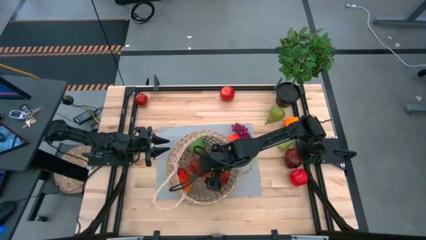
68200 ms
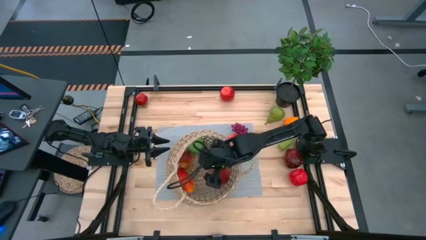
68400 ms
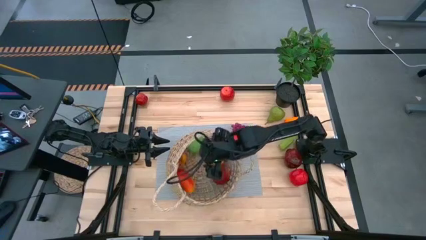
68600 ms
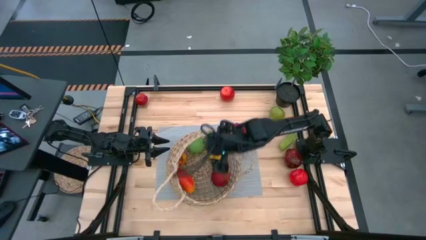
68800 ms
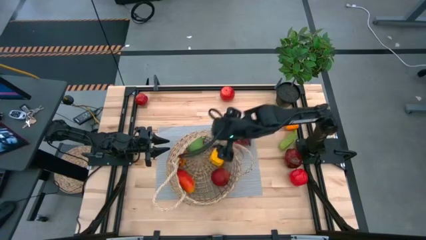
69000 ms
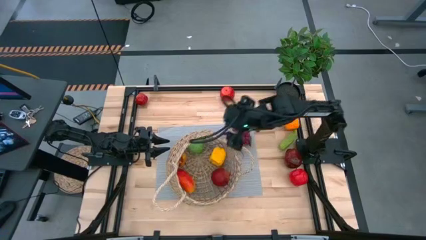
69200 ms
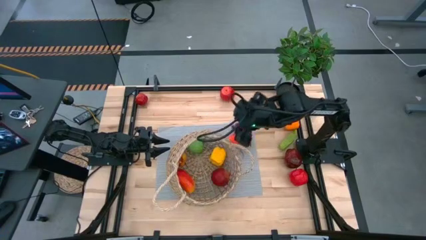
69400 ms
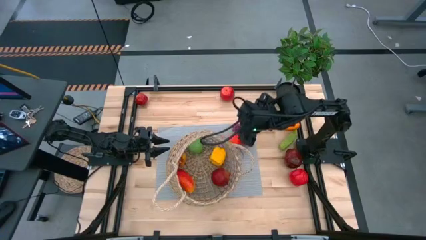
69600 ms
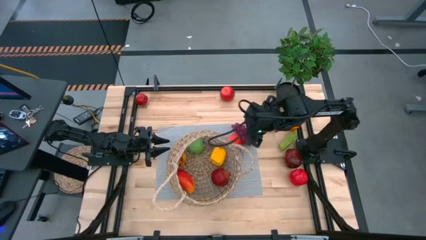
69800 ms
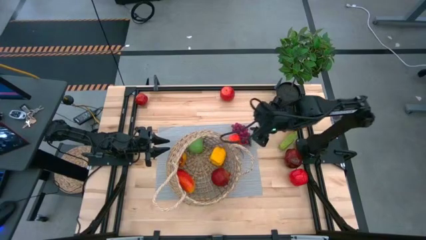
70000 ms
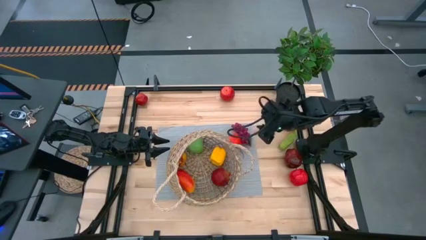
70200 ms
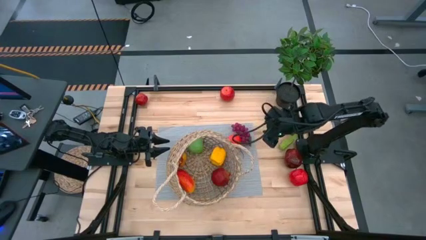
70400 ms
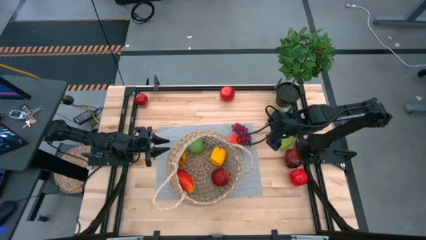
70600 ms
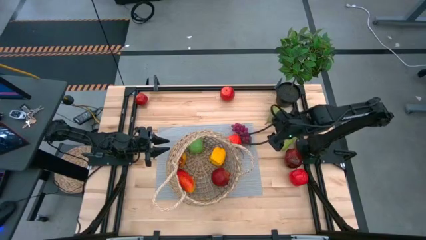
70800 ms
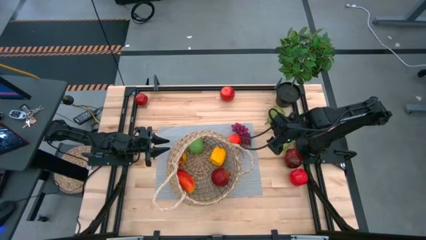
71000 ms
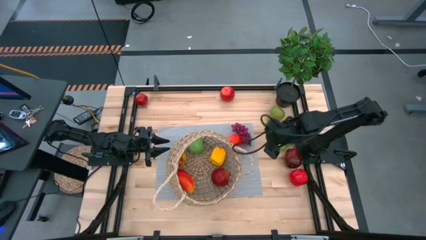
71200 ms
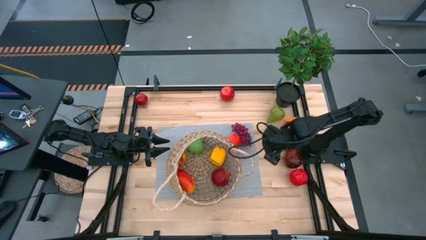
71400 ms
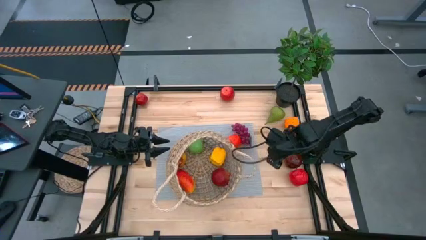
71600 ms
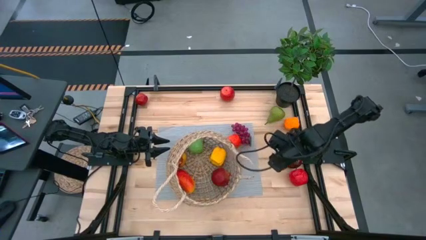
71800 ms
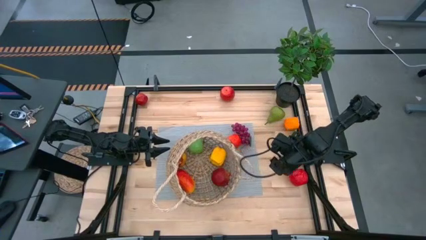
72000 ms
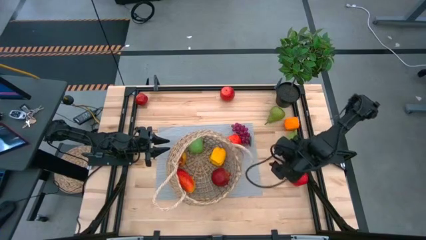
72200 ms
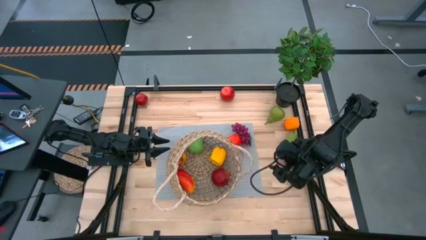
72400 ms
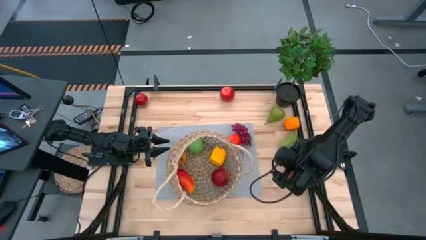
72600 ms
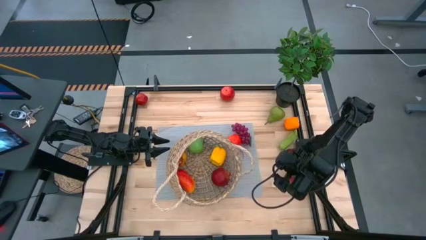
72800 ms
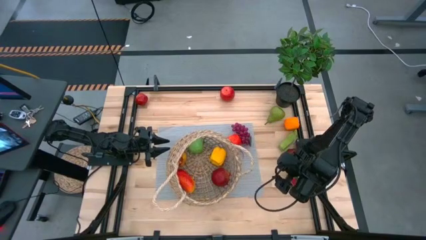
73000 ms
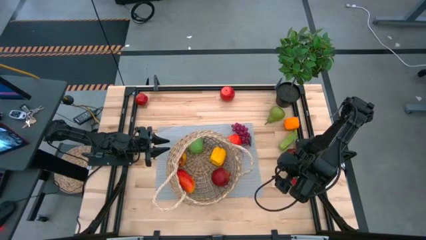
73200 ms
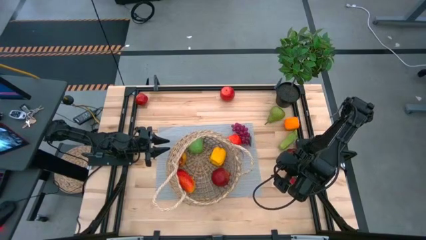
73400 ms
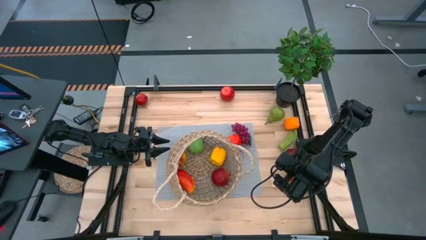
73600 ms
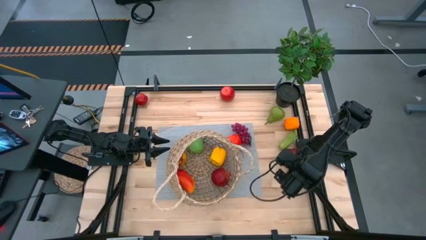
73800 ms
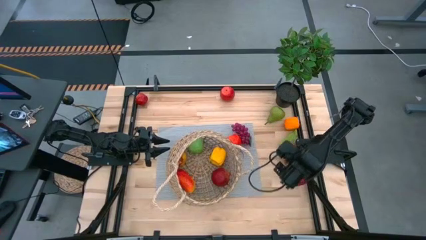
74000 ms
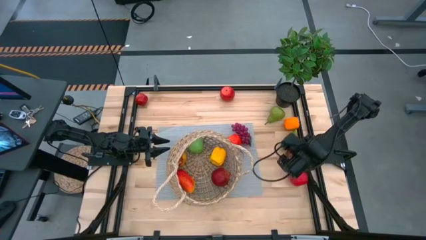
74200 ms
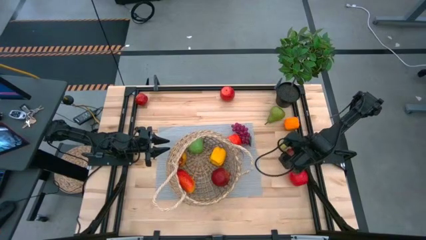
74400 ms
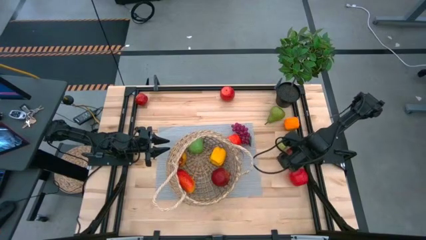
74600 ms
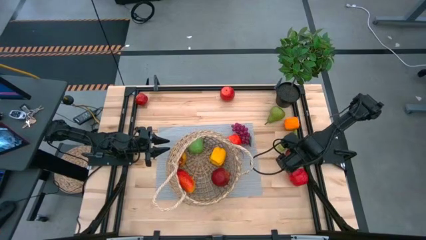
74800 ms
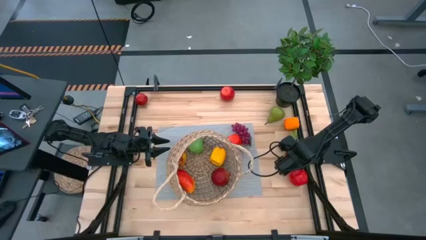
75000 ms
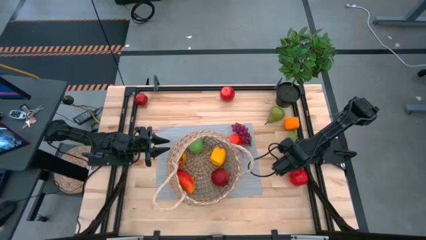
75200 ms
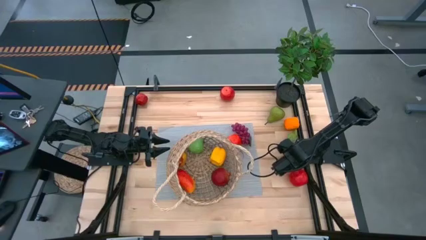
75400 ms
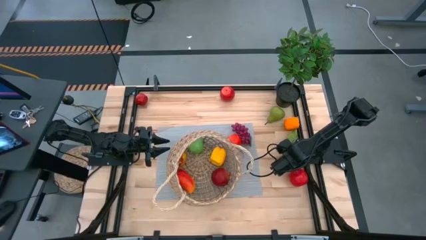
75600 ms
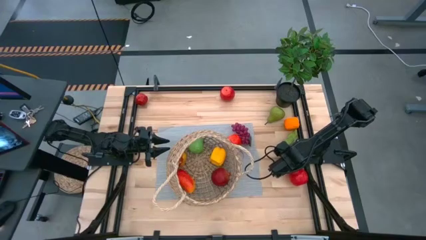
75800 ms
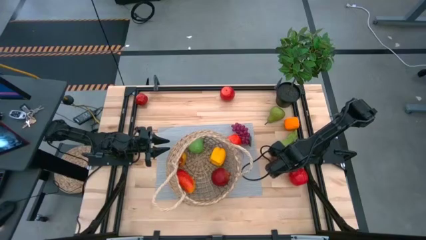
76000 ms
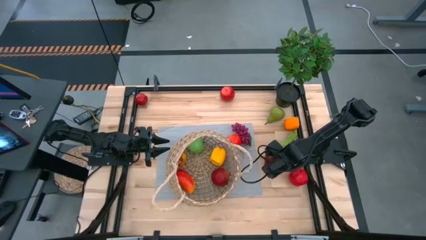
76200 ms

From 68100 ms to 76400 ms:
Task: Build produce basket
Put the red apple into the brown basket

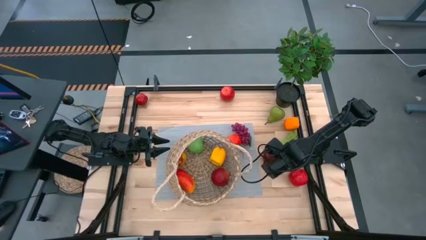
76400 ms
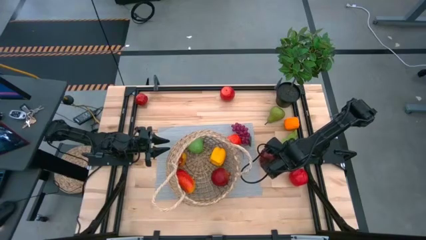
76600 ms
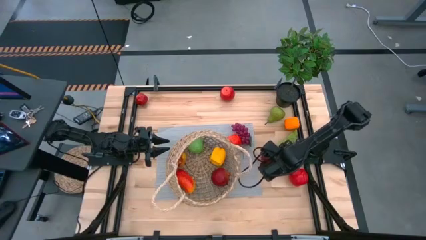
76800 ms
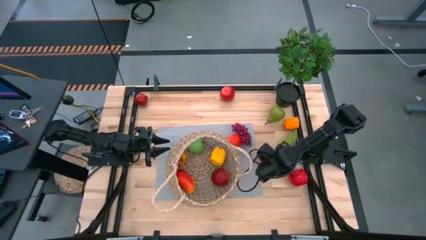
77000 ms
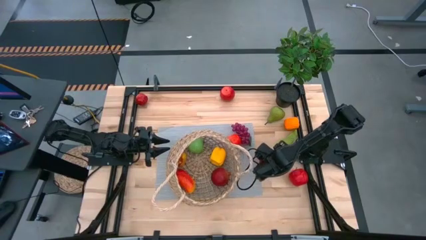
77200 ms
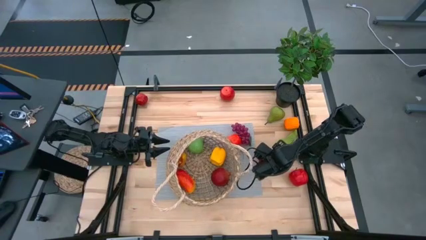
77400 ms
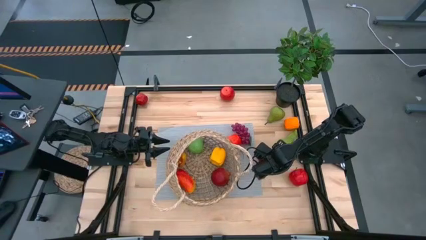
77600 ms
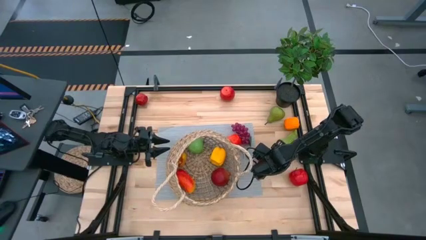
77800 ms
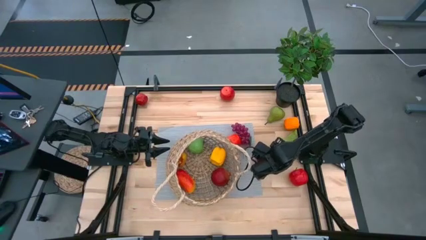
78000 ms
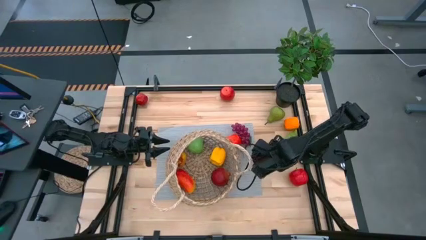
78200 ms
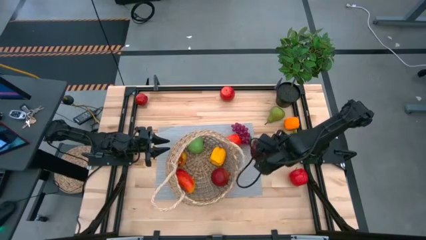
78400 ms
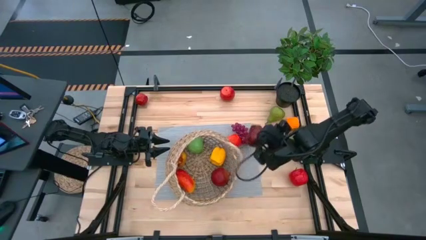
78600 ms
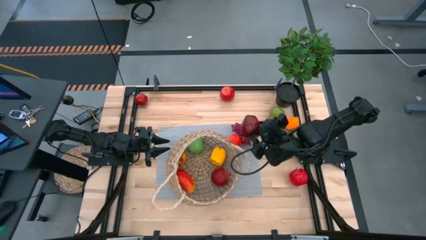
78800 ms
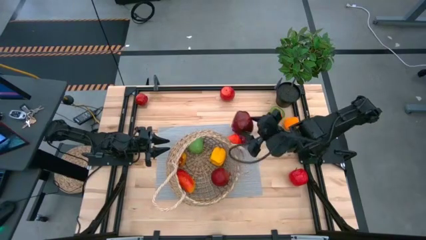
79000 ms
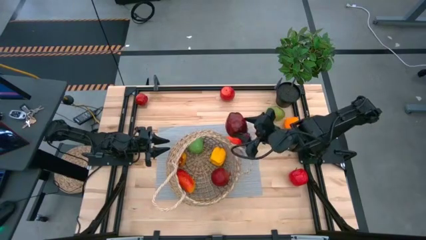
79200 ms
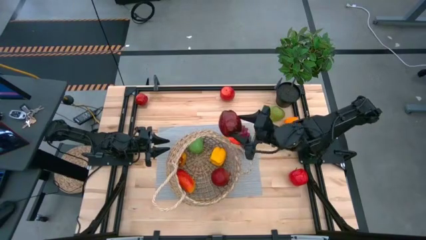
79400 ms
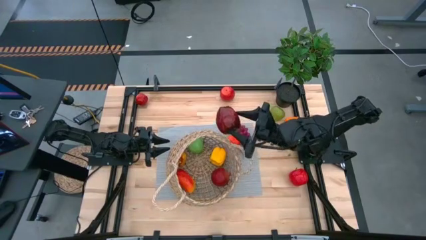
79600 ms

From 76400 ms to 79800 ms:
Put the red apple into the brown basket

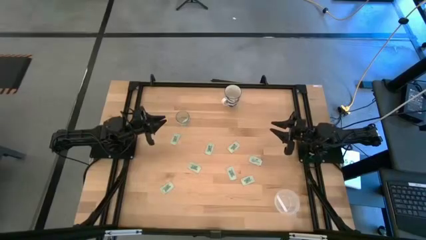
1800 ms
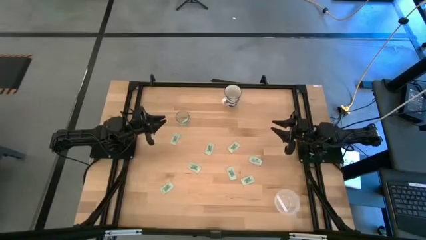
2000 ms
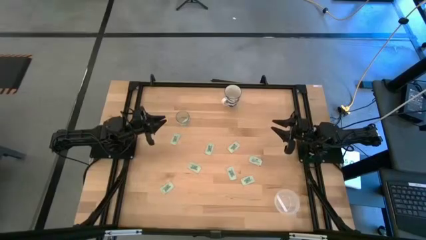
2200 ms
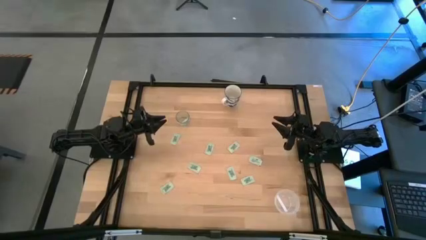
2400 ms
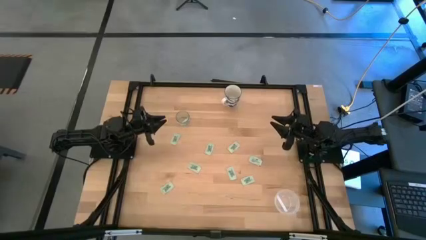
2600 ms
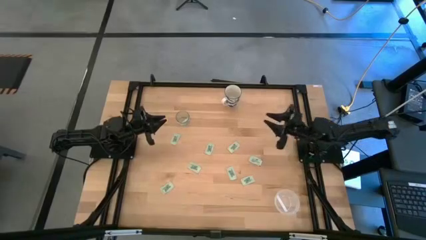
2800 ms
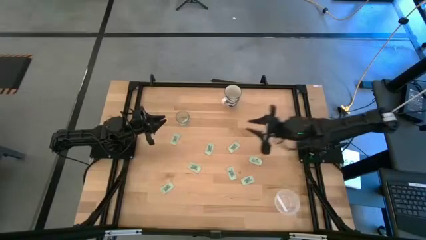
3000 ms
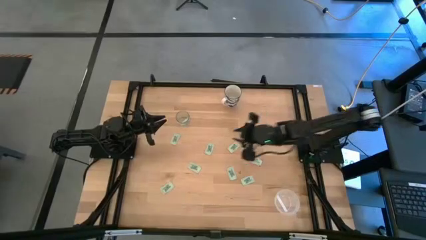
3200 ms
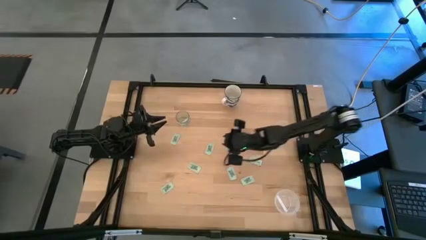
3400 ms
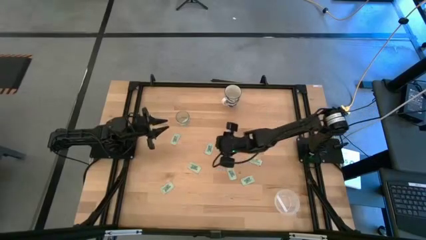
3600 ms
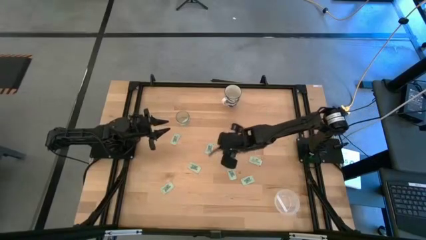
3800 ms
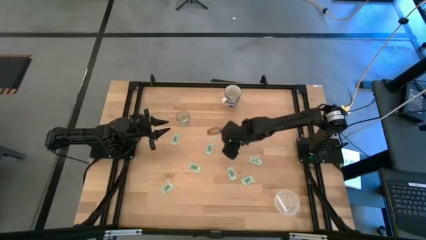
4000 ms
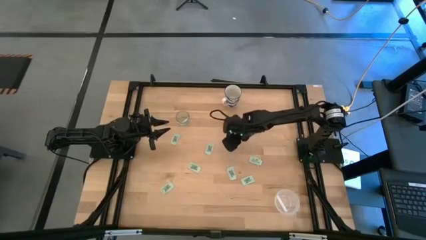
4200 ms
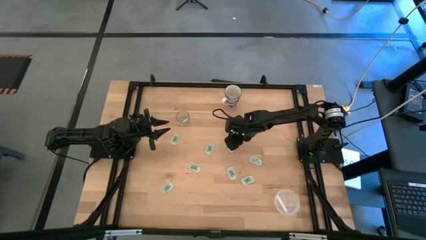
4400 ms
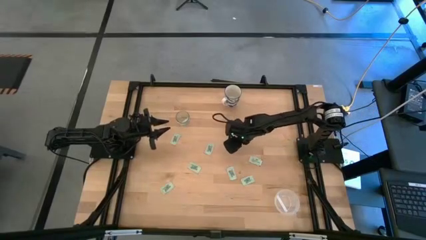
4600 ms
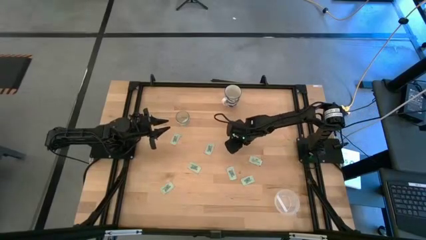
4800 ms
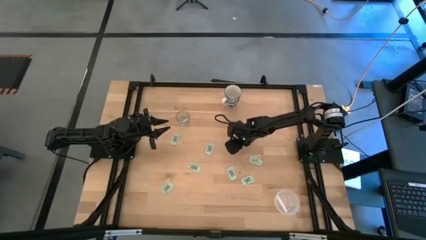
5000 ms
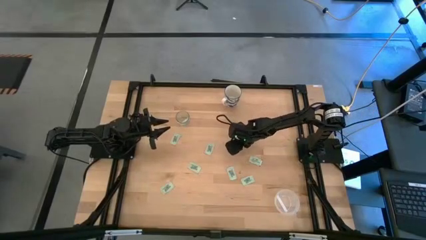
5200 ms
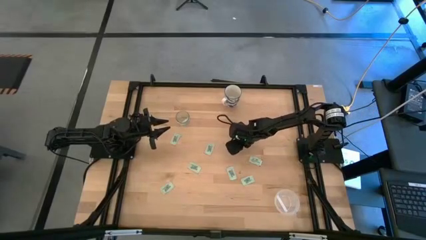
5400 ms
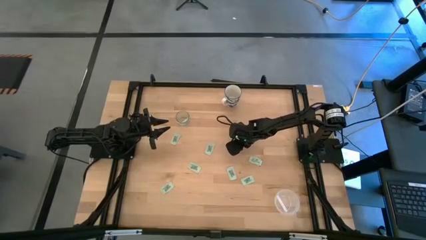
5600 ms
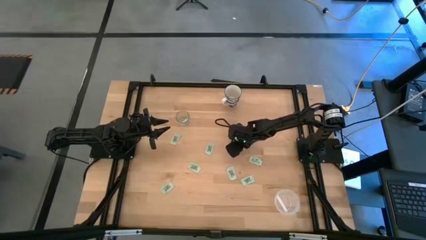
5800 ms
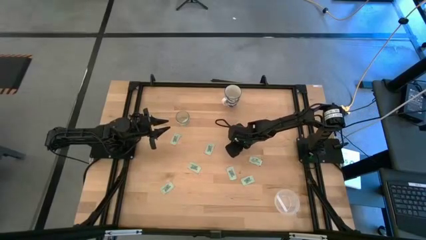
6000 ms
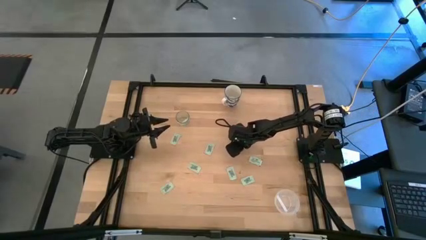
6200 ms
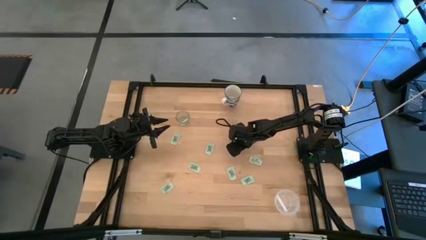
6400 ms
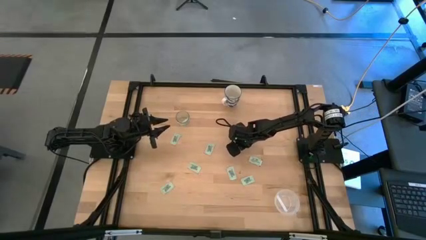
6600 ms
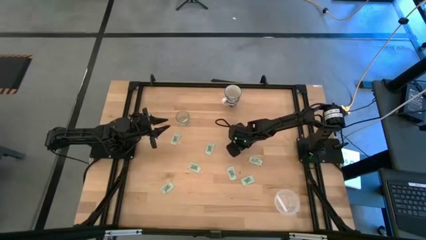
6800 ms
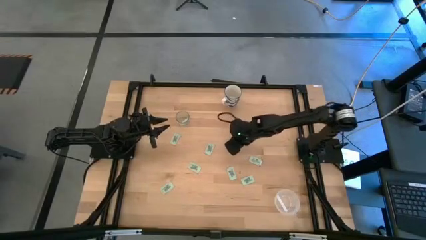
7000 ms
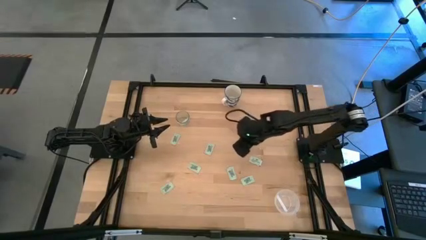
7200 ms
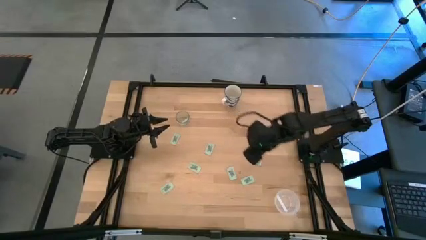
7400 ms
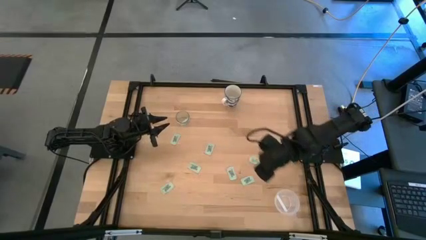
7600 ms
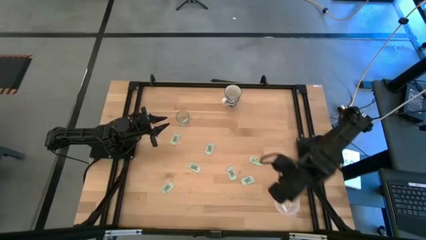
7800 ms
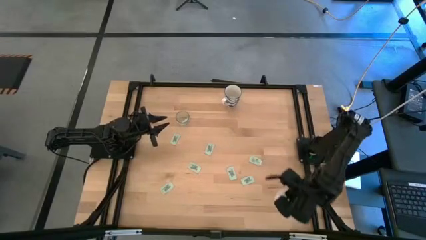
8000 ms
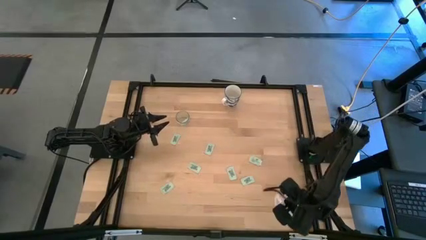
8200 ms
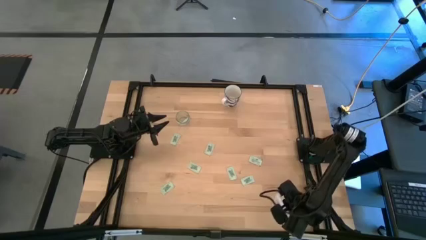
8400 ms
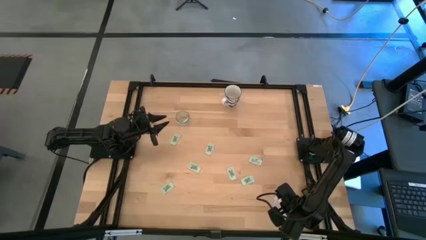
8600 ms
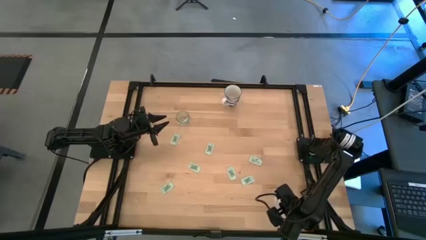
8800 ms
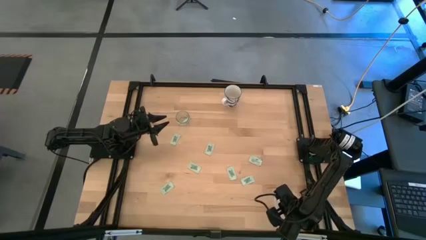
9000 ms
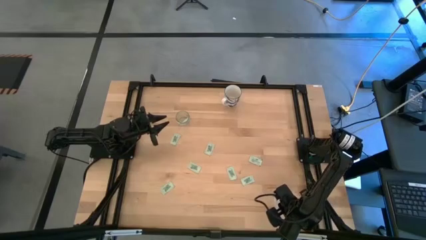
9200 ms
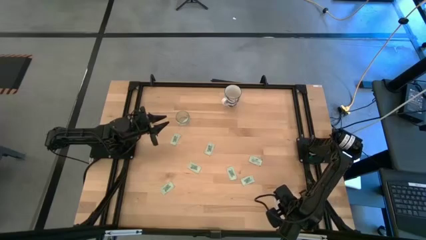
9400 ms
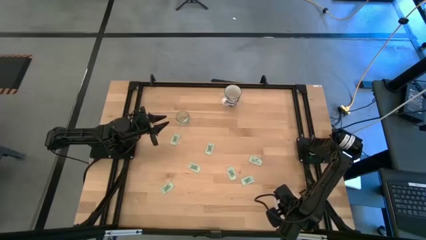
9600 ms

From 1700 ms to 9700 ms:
Task: Pick and place Stevia / Truvia into bins
Put the green stevia packet into the transparent container
